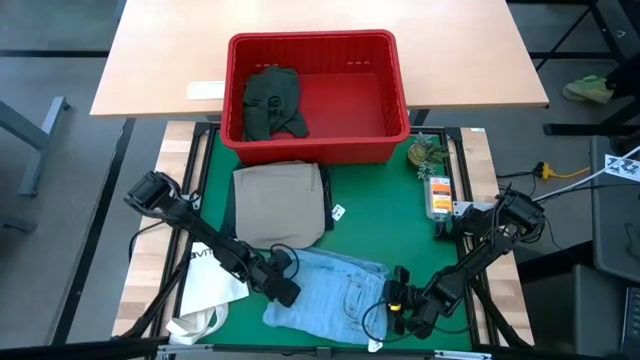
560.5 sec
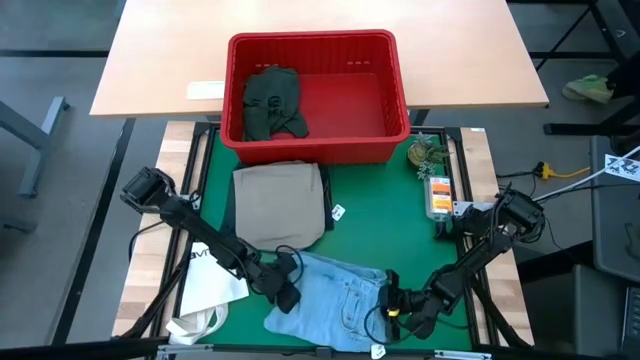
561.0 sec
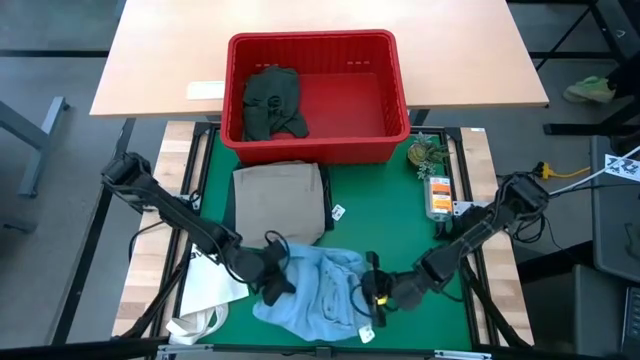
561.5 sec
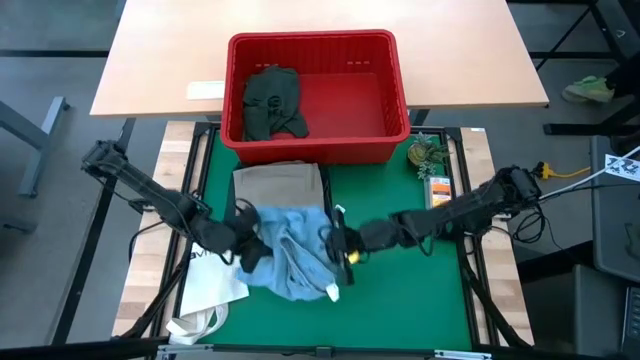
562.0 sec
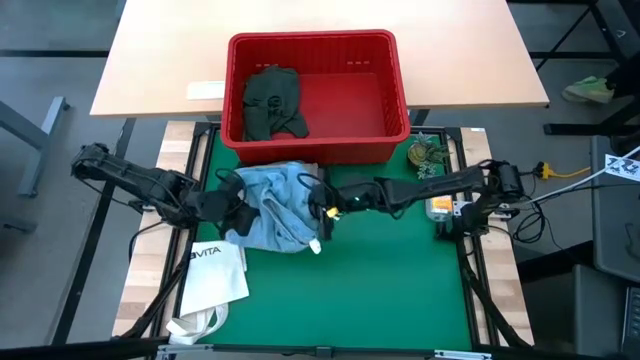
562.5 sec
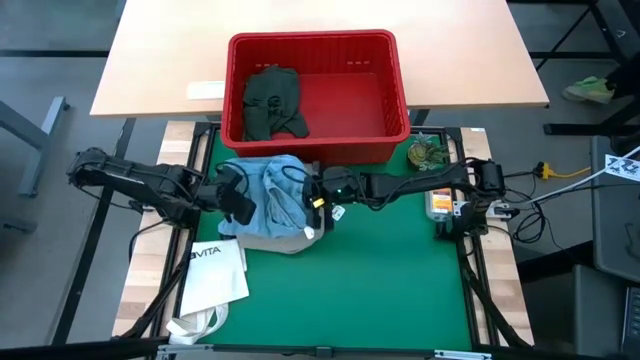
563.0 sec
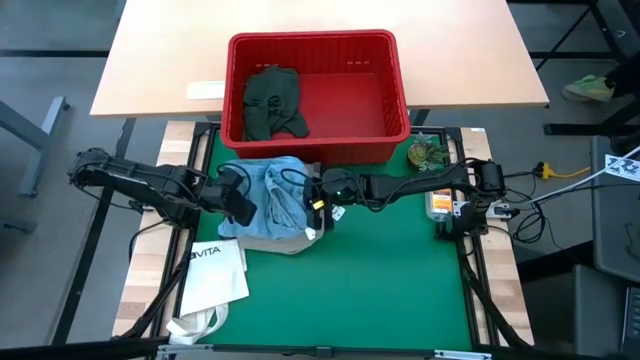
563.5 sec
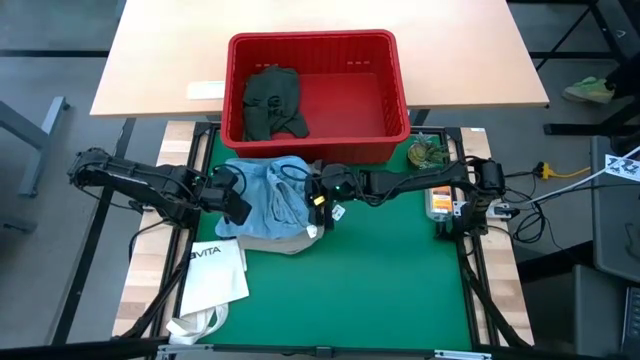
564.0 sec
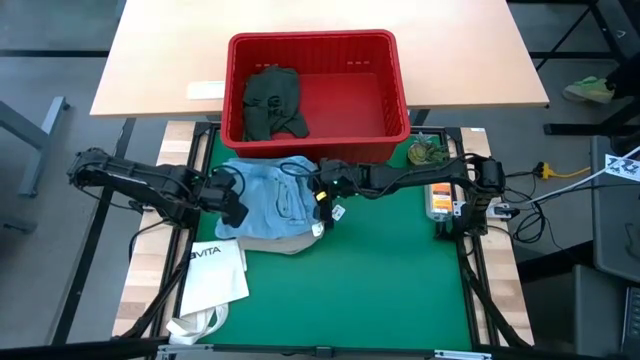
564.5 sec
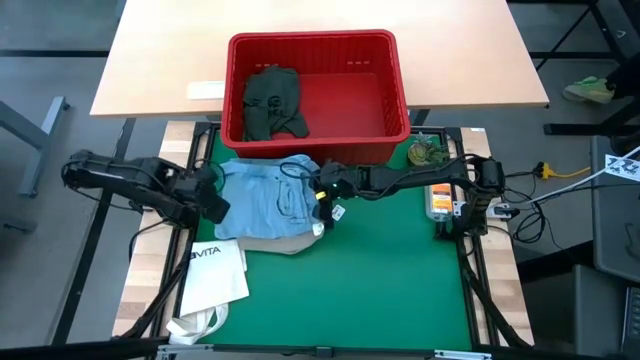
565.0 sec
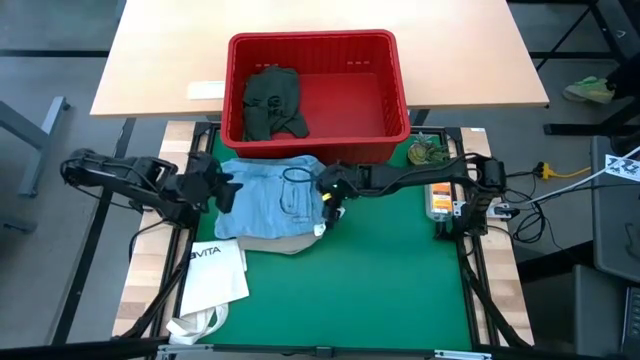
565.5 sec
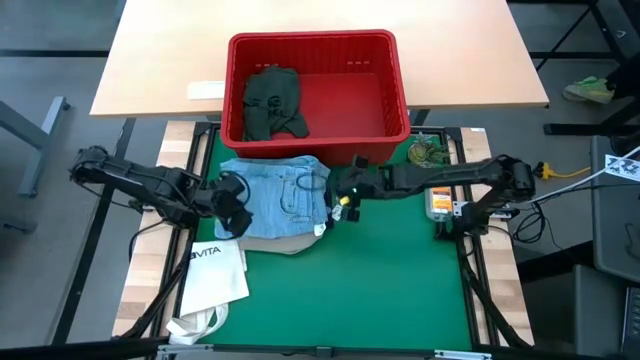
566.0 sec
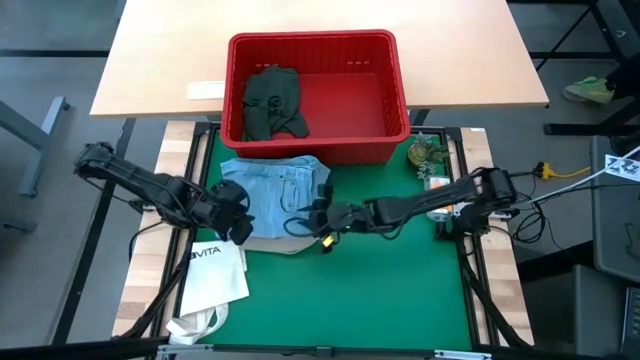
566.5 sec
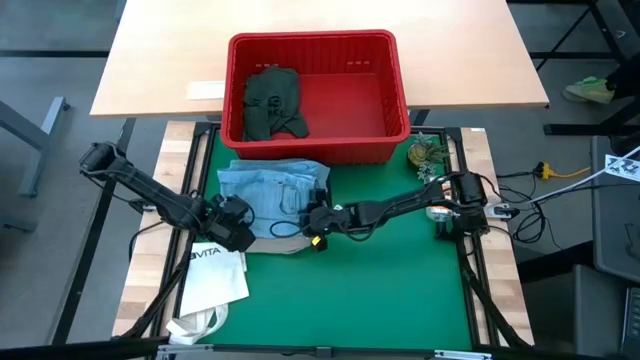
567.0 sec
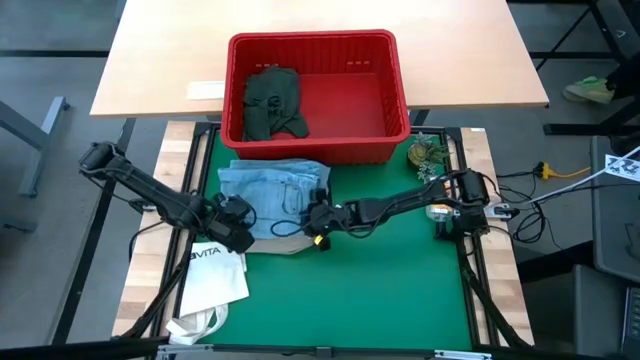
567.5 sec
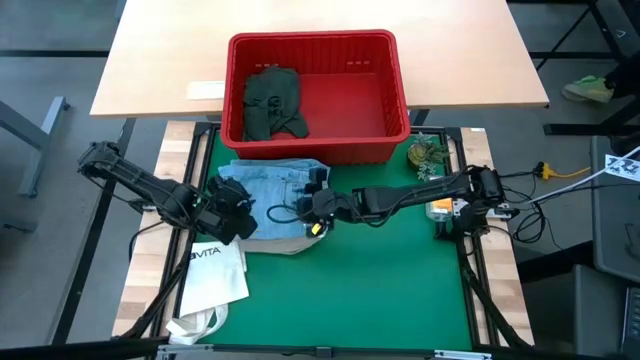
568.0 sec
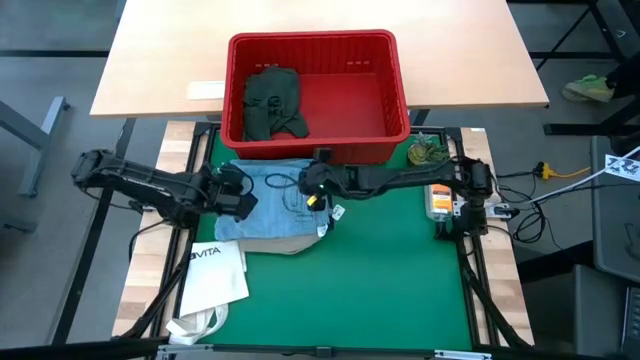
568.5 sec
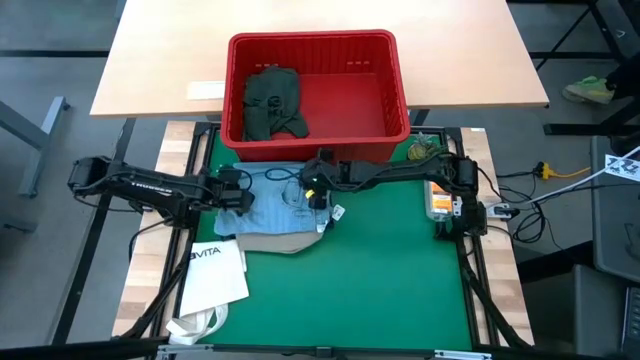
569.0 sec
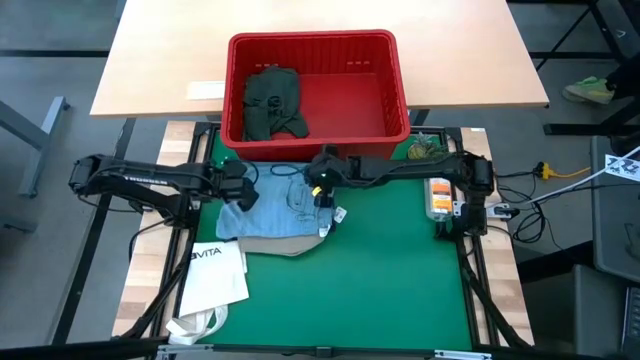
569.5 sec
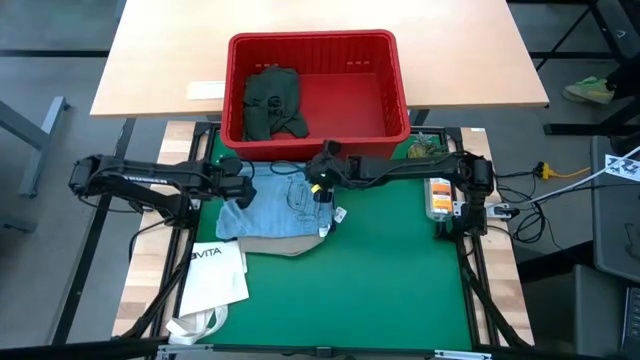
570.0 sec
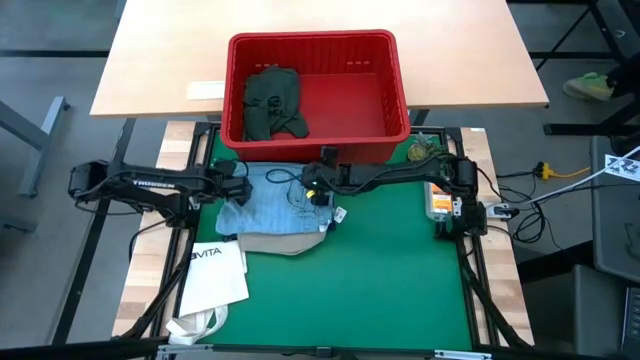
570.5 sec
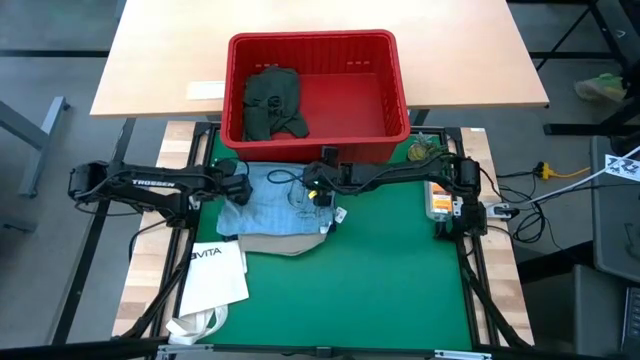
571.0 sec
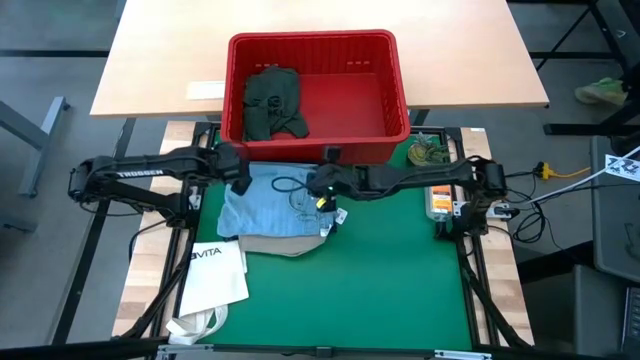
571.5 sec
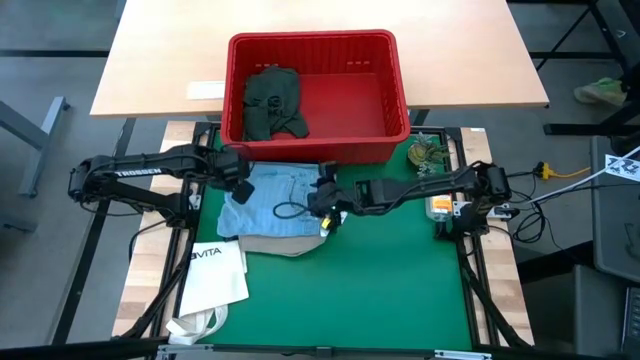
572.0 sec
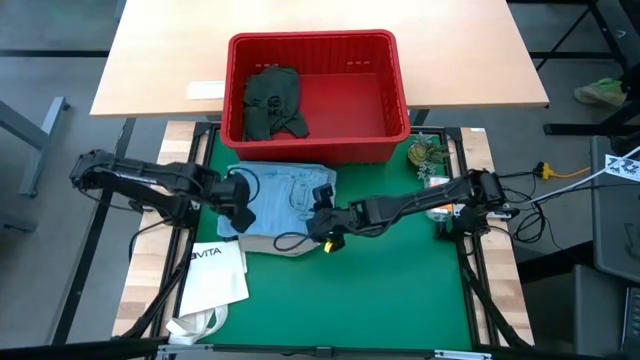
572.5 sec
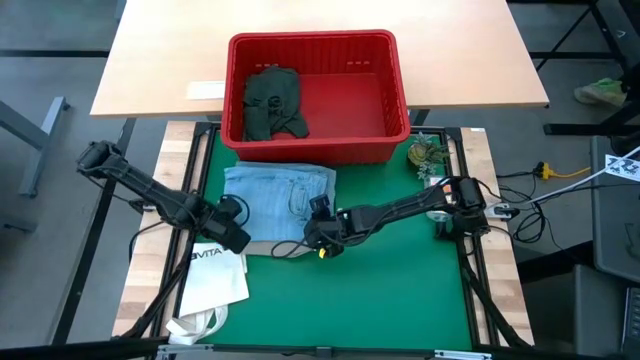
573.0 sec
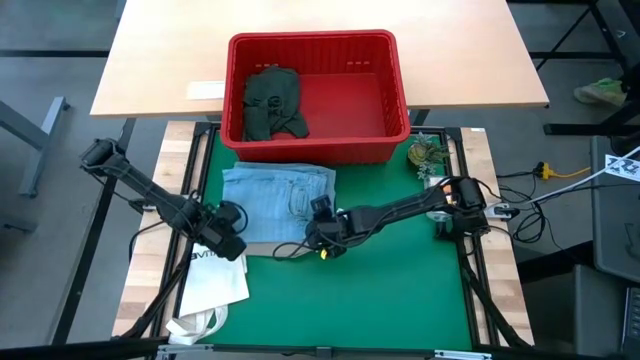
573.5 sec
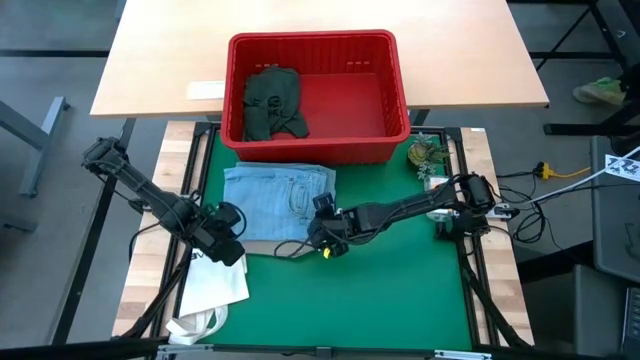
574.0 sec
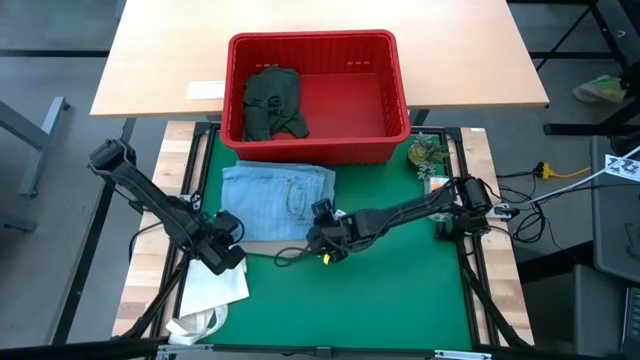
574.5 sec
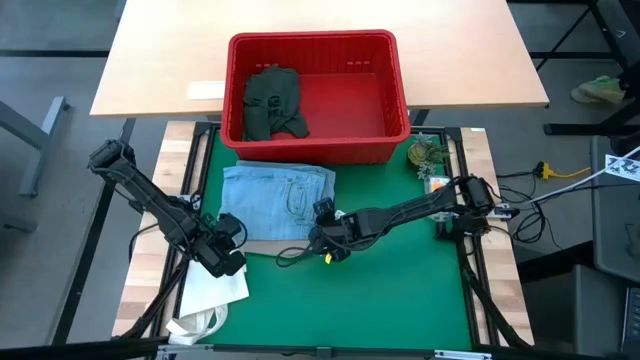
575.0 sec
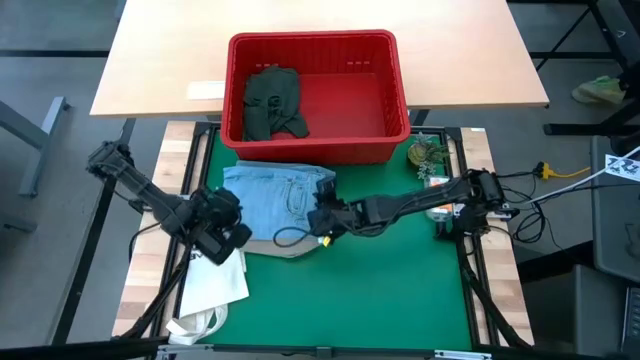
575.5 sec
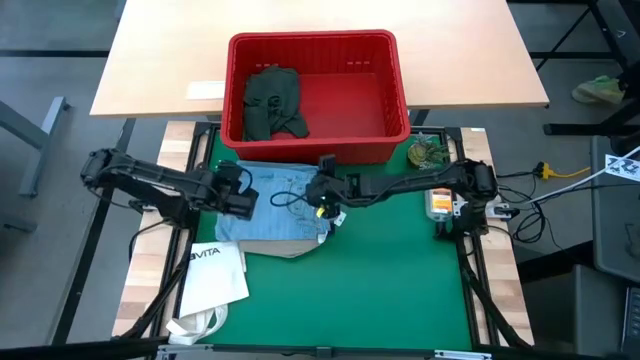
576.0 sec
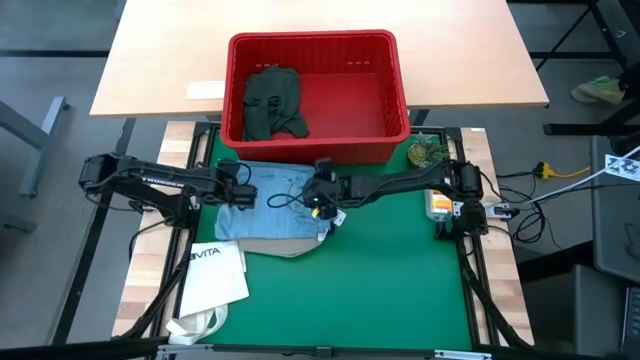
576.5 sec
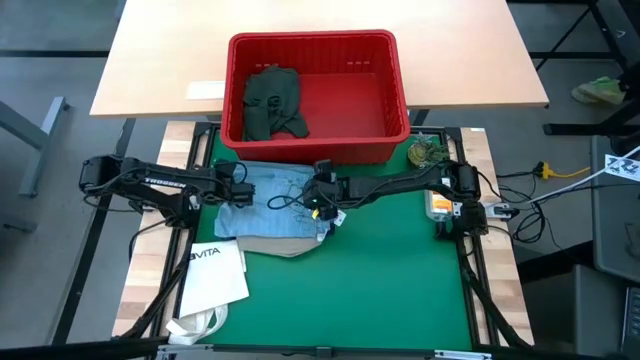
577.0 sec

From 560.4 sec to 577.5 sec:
Task: Fold Laundry from Bin
Stack the folded light blue pants on top of the folded brown shorts

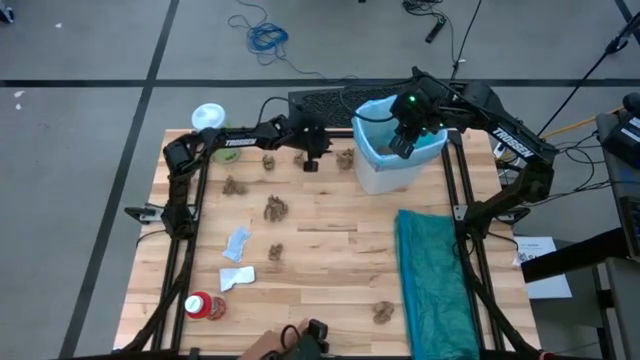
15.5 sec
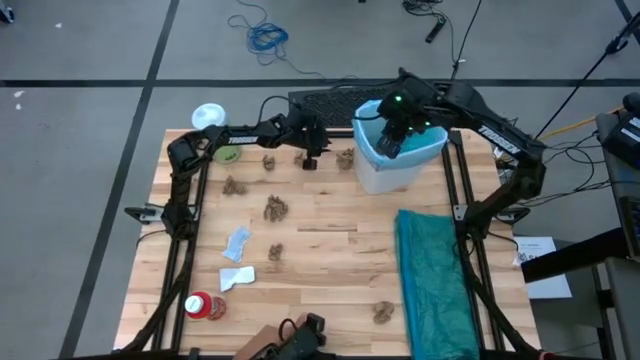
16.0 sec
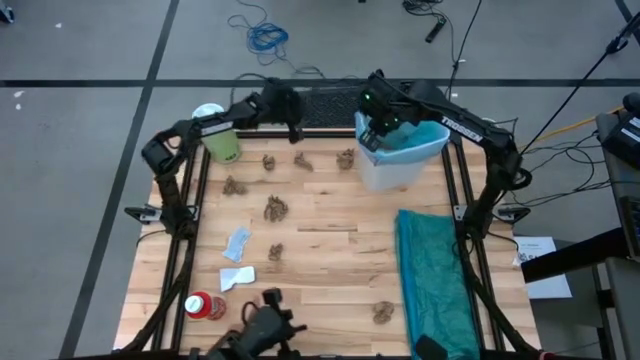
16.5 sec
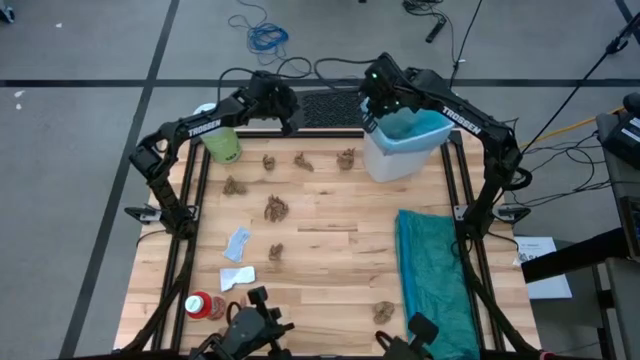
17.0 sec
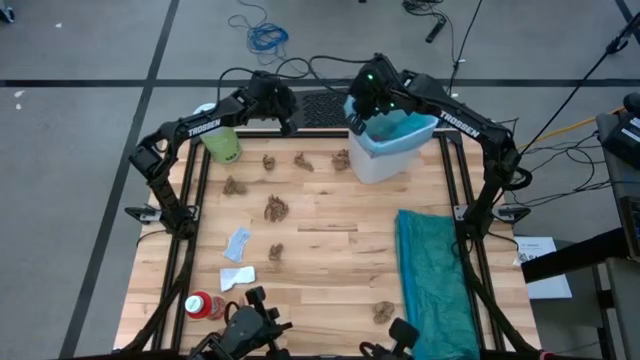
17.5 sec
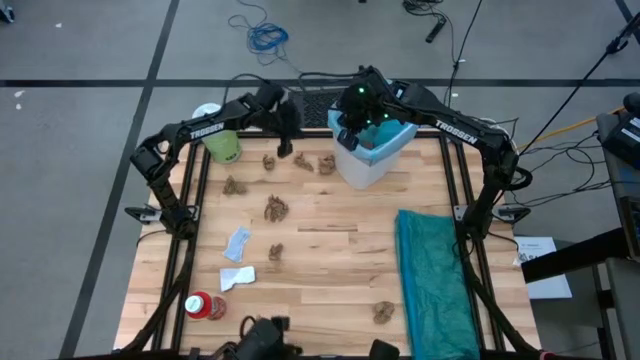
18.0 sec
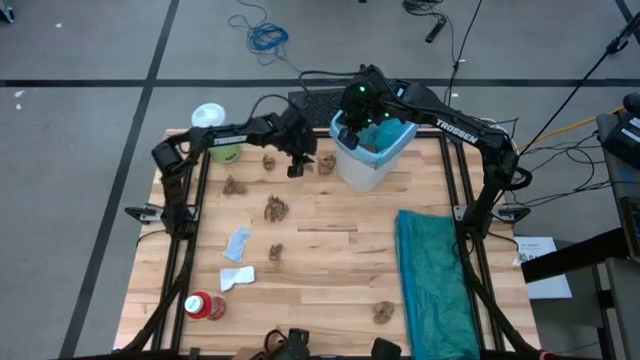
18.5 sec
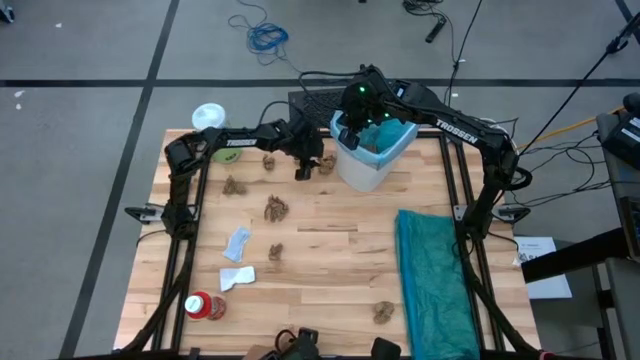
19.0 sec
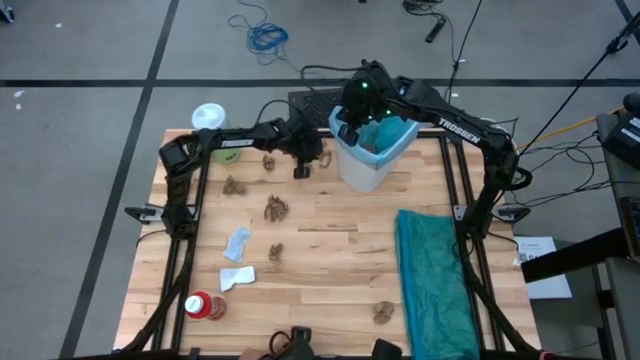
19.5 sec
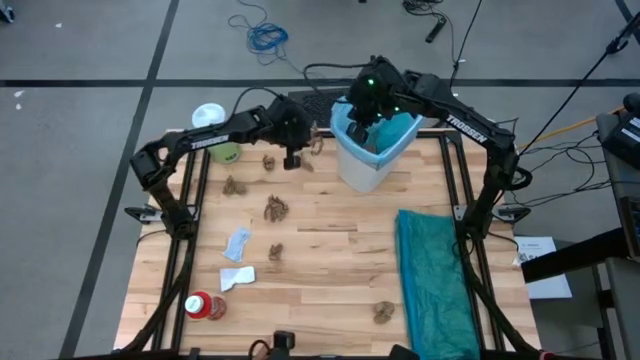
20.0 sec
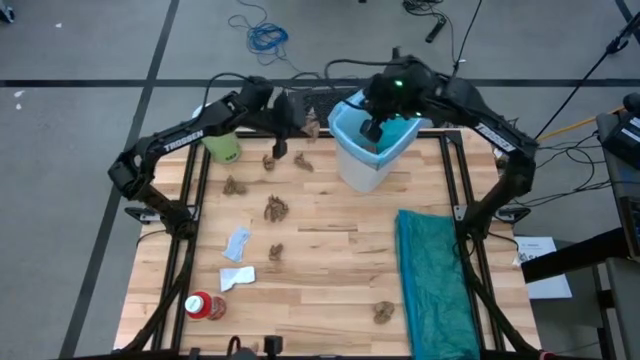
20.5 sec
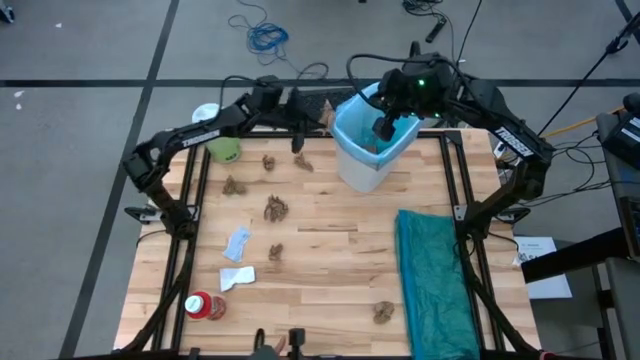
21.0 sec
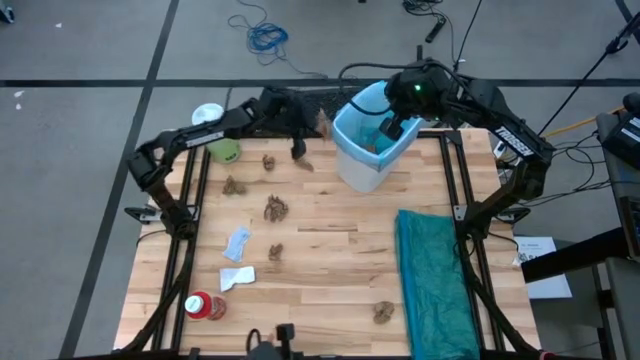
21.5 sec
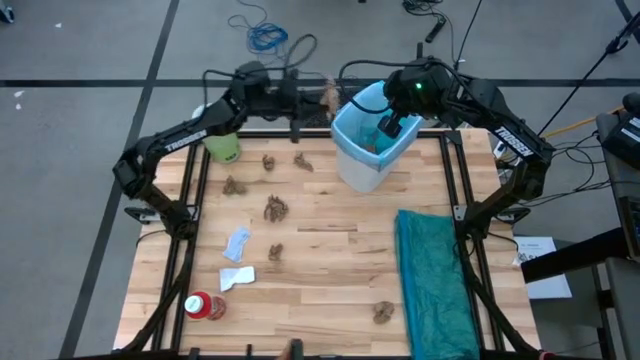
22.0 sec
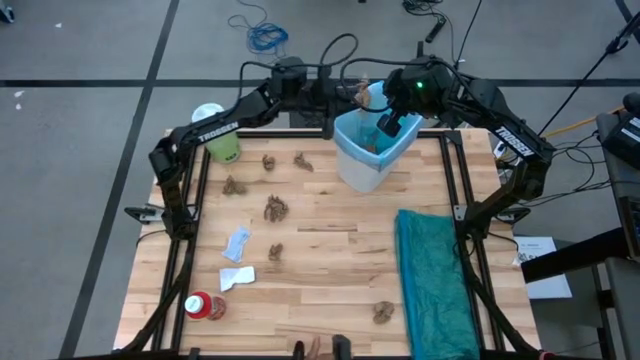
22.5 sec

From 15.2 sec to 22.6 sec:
Task: place trash/remove bag and relplace
Put the brown paper trash into the trash bin
